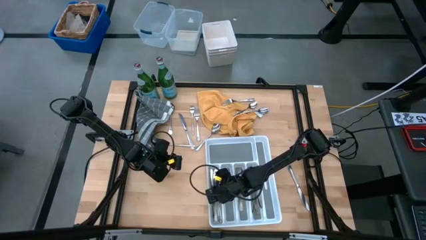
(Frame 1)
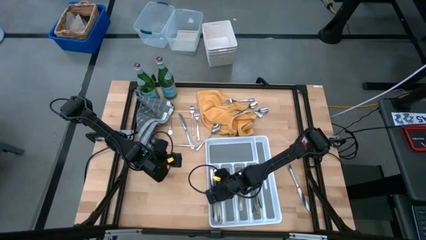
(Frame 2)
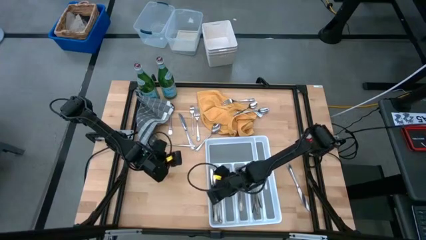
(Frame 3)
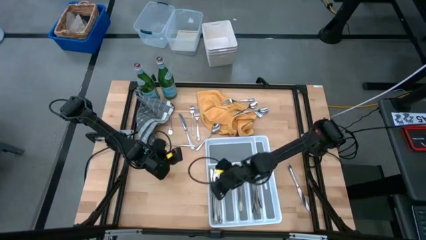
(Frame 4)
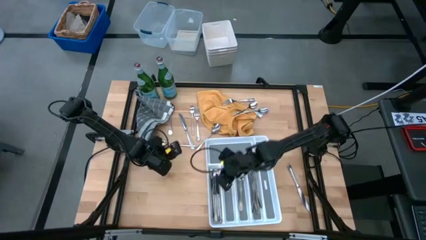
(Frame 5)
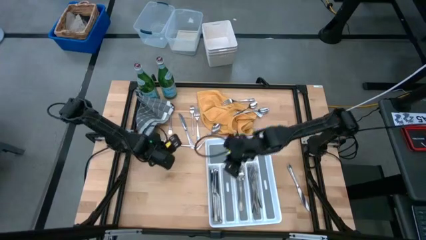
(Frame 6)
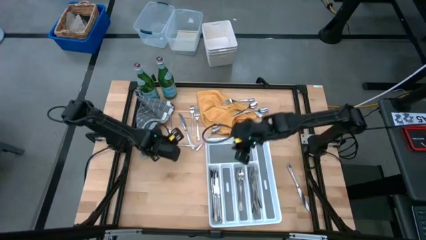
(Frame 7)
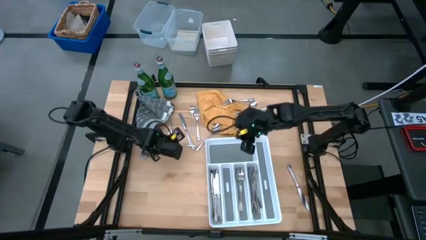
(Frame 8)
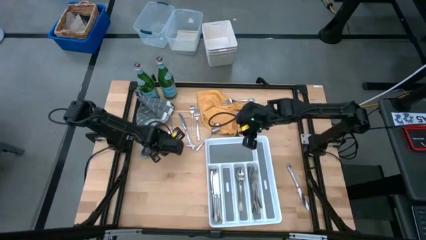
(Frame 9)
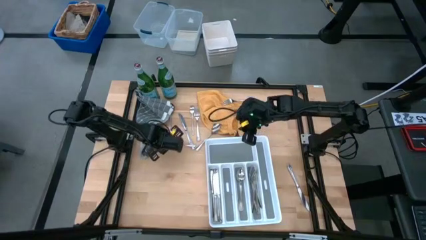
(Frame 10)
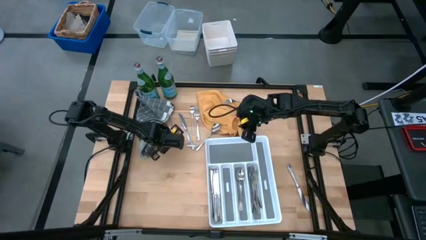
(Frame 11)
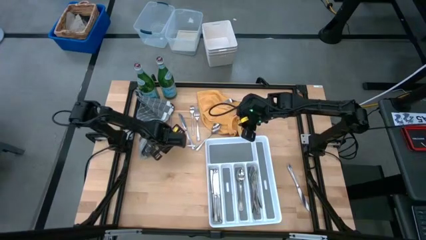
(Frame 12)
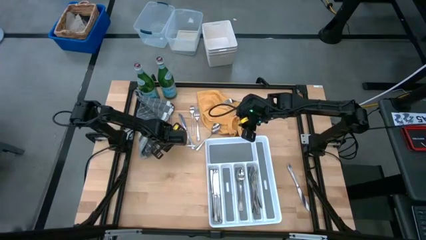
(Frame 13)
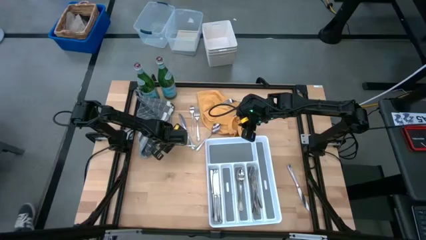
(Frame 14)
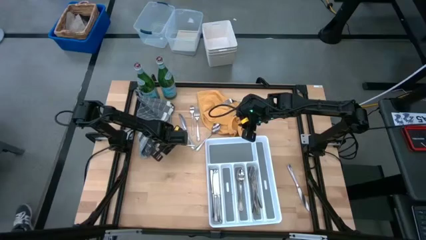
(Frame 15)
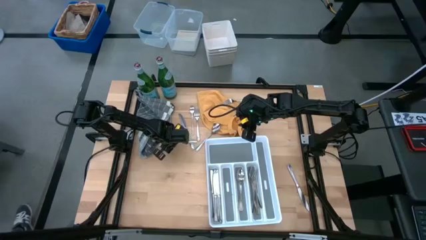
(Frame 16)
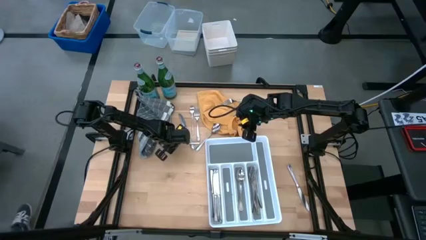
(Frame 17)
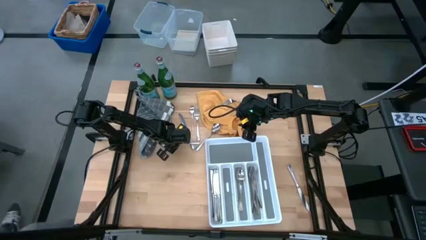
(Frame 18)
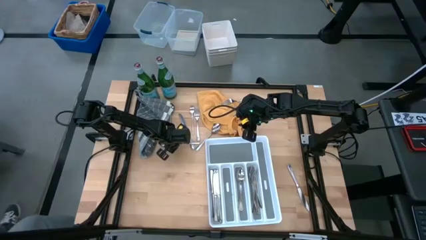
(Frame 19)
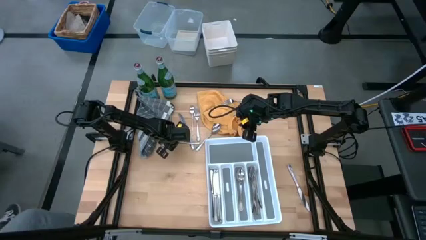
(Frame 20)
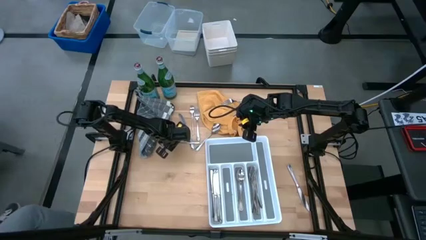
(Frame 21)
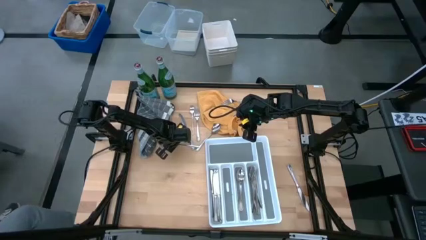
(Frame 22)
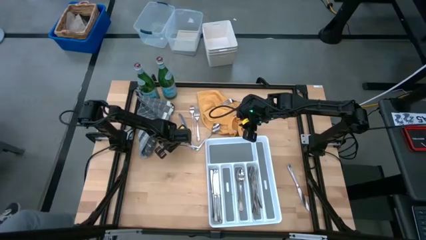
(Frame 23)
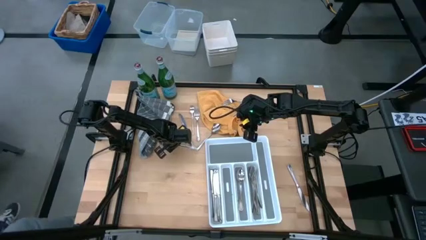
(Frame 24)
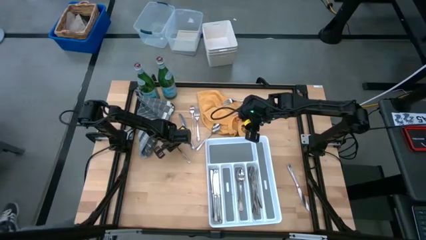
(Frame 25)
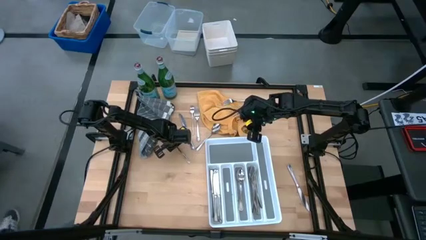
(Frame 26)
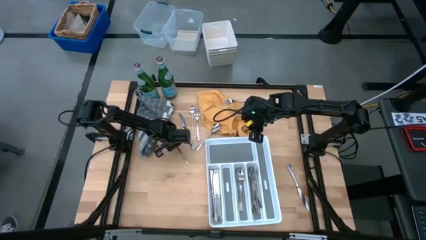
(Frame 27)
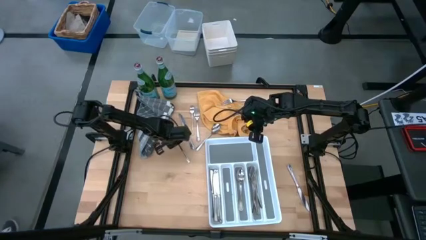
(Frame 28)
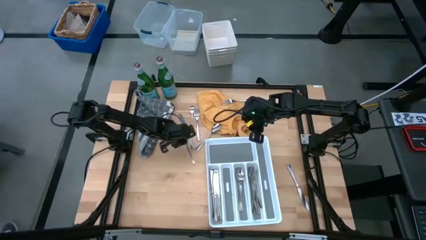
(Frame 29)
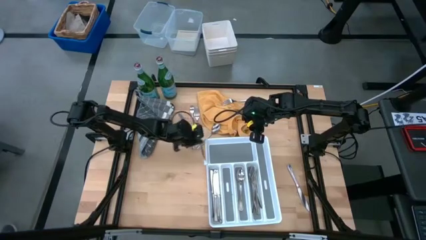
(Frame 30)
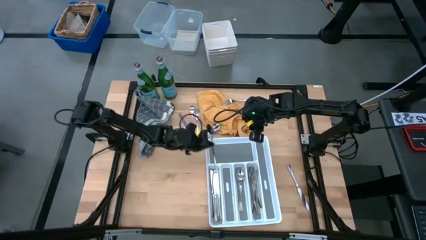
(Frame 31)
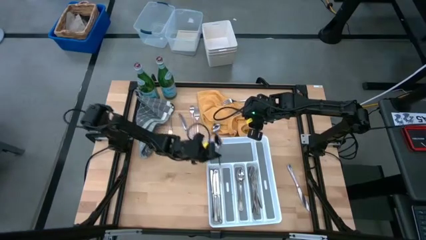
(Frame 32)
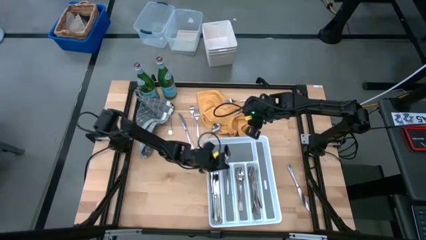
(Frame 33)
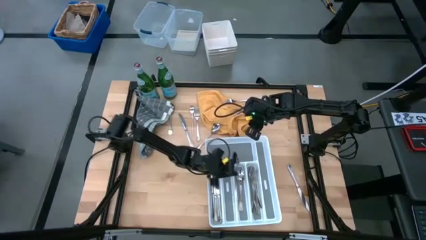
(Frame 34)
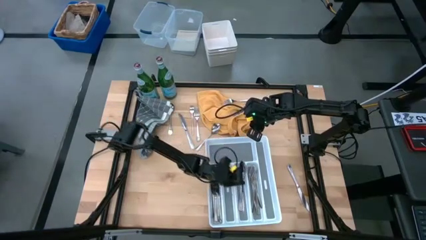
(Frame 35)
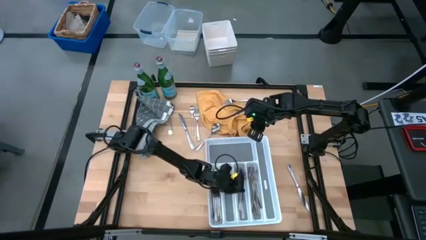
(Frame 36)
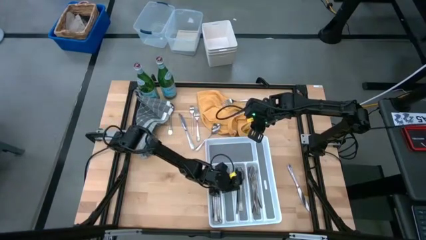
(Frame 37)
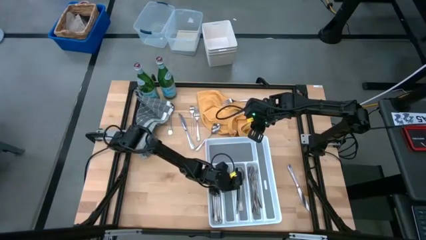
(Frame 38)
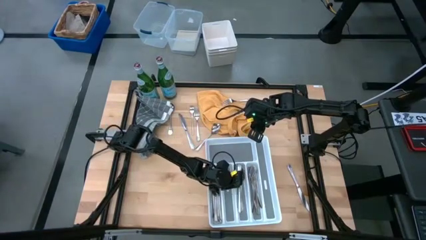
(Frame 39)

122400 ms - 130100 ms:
Task: Sort silverware
Put the spoon into the silverware tray

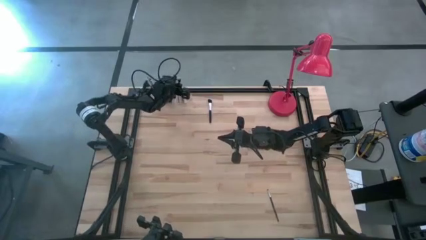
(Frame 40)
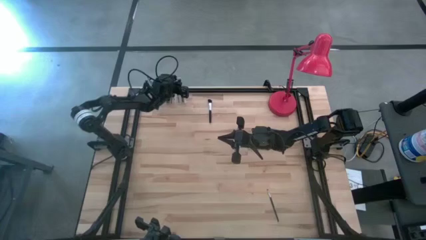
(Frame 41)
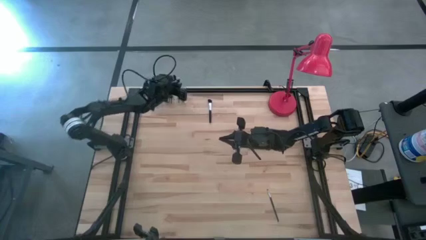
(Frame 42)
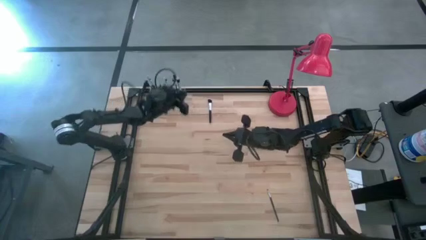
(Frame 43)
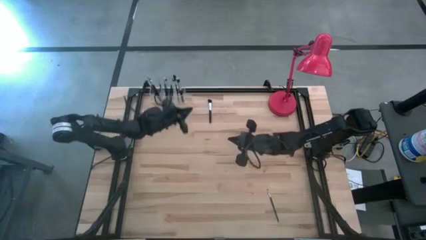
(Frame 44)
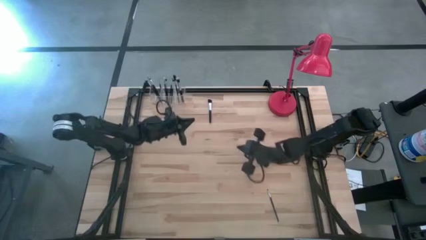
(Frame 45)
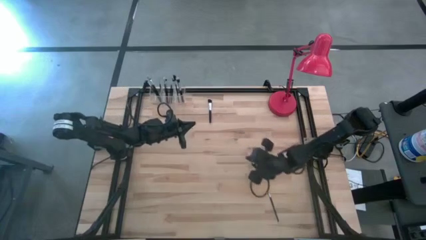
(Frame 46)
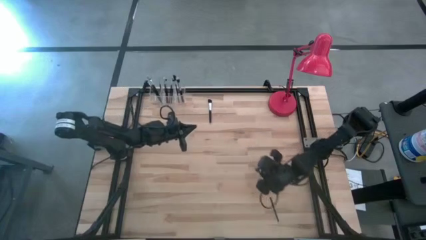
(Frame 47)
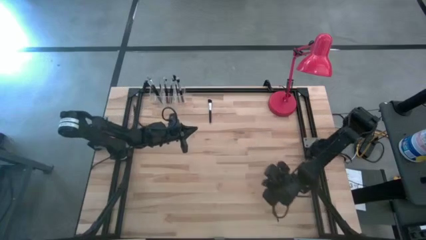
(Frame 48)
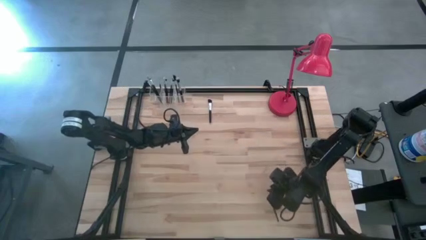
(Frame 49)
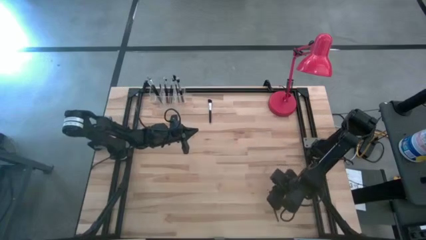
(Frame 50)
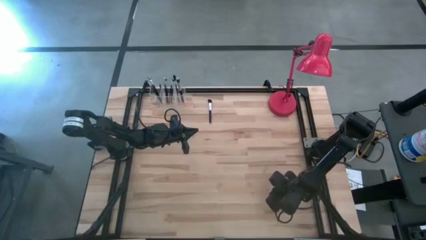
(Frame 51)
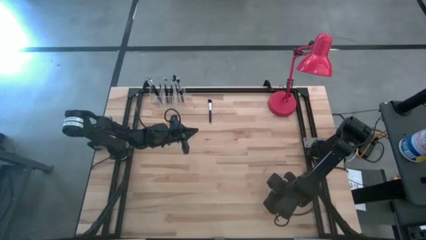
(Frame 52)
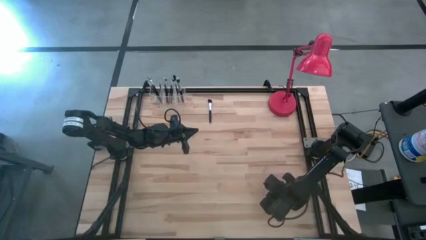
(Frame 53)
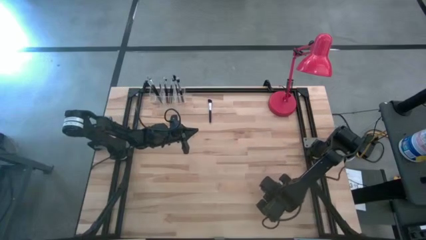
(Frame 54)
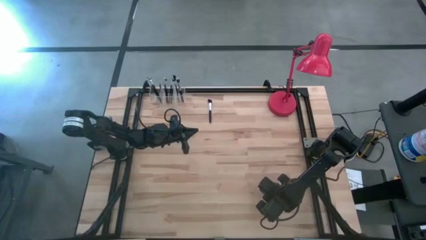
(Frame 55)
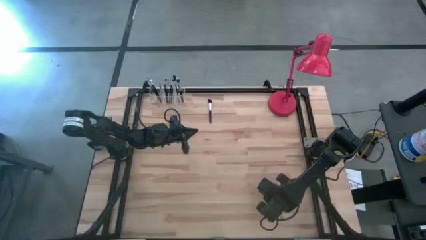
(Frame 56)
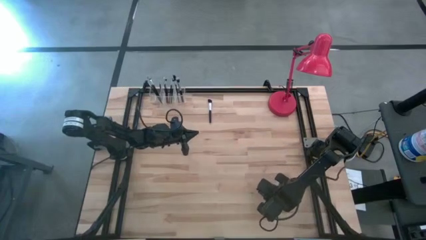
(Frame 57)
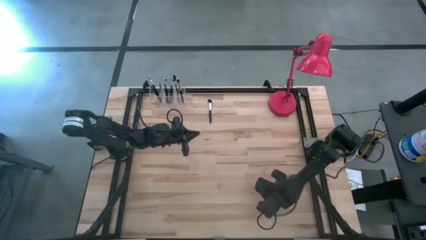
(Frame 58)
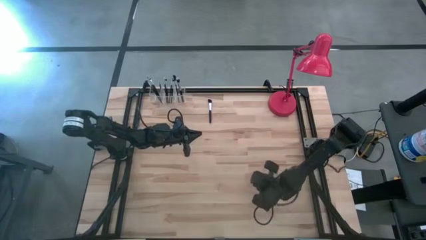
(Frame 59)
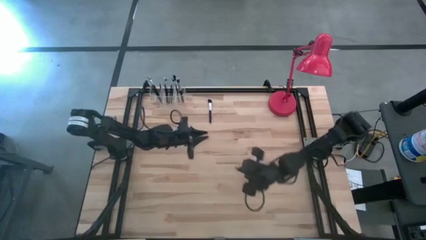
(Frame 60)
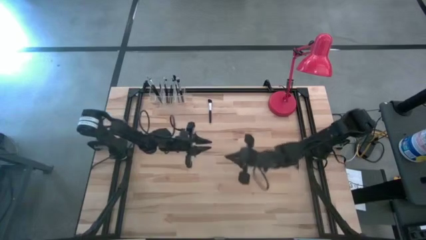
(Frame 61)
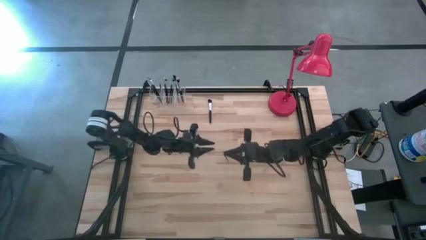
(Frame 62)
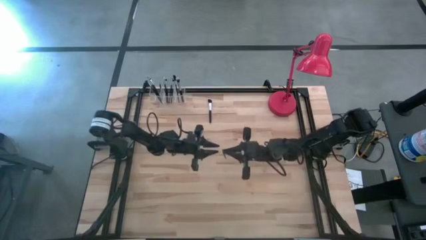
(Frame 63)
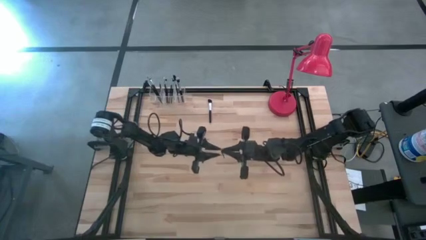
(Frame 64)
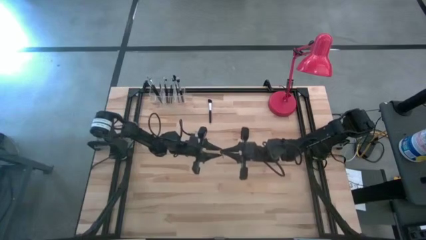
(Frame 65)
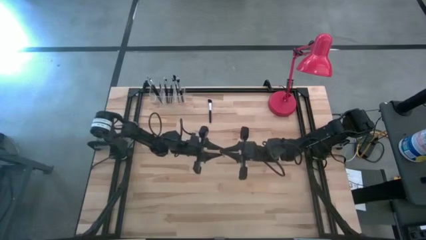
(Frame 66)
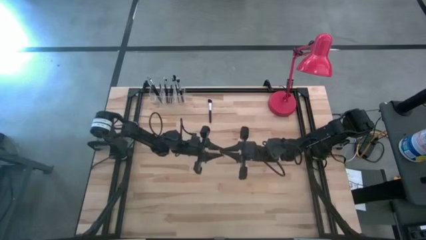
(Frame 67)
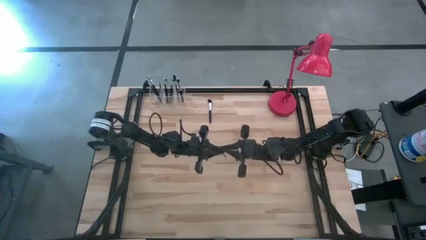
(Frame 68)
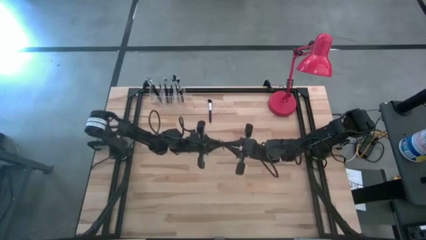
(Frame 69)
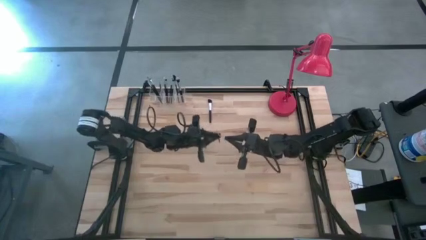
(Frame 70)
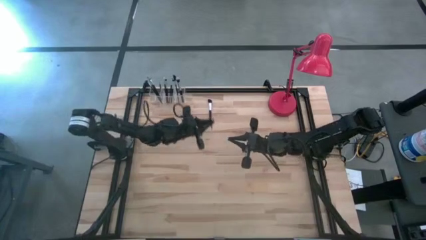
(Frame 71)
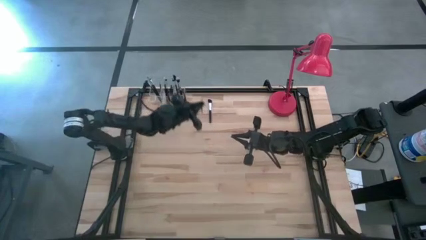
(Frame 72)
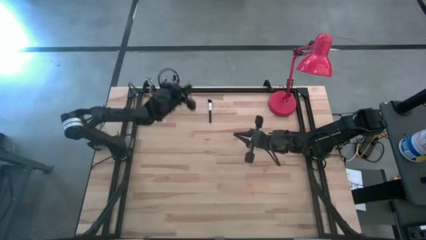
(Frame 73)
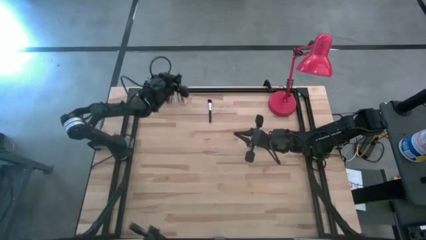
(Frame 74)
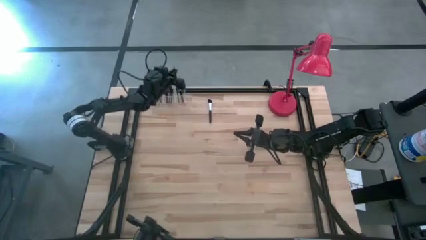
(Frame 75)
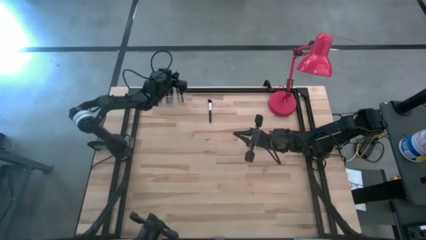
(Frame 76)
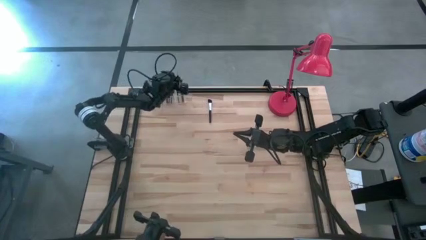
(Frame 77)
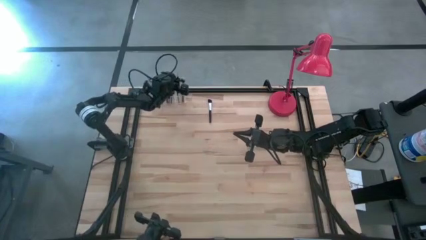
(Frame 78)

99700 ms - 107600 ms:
Task: Pick & Place Makeup Brushes
Put the eyeshadow brush into the transparent organizer
